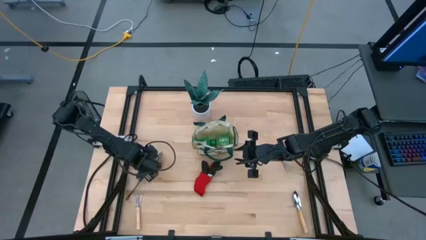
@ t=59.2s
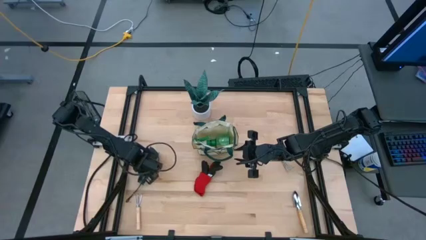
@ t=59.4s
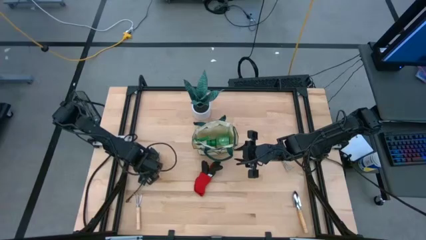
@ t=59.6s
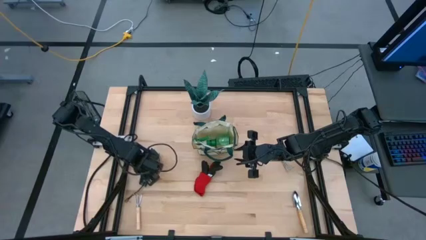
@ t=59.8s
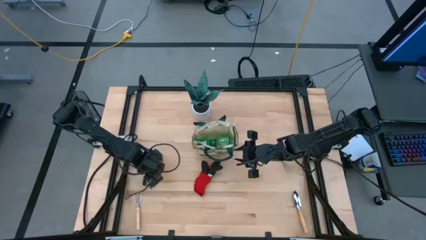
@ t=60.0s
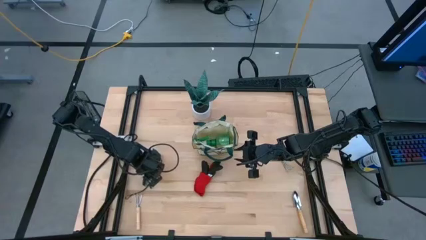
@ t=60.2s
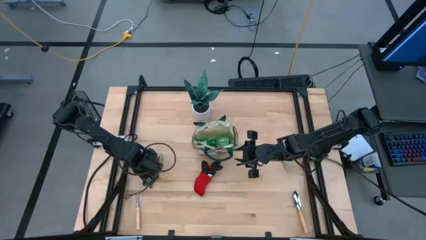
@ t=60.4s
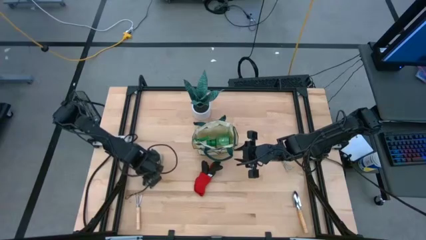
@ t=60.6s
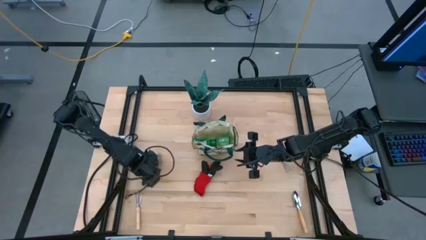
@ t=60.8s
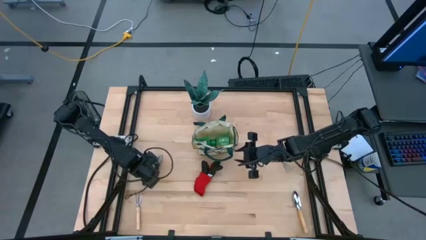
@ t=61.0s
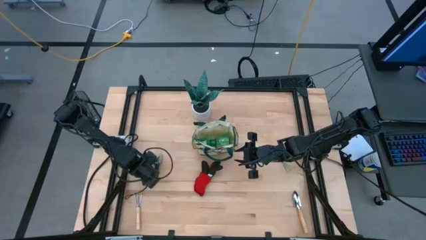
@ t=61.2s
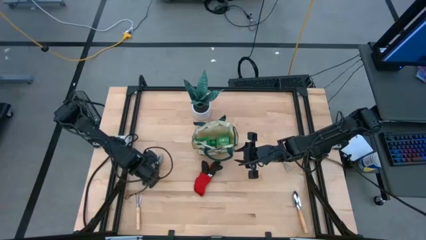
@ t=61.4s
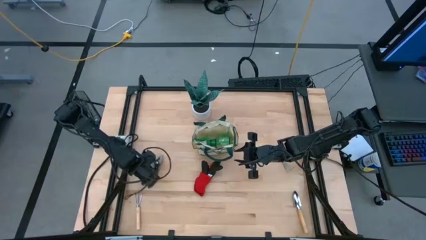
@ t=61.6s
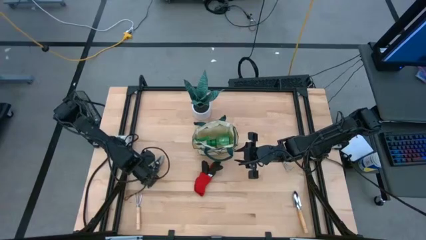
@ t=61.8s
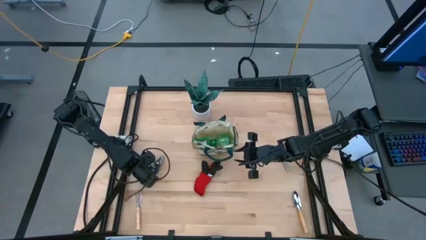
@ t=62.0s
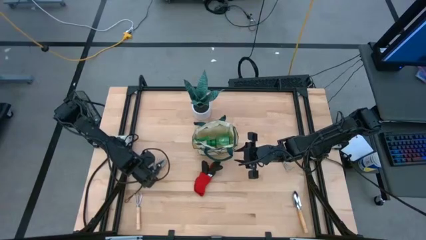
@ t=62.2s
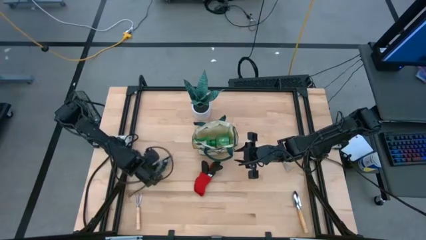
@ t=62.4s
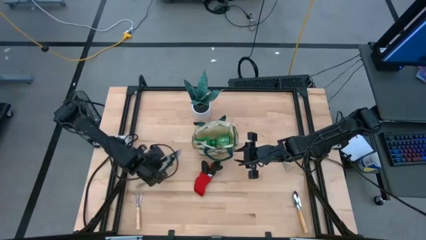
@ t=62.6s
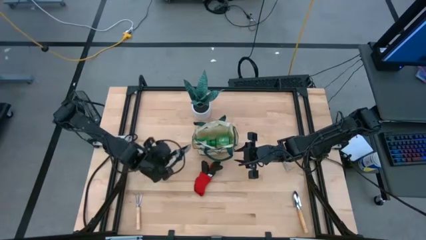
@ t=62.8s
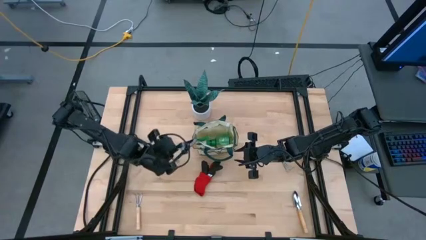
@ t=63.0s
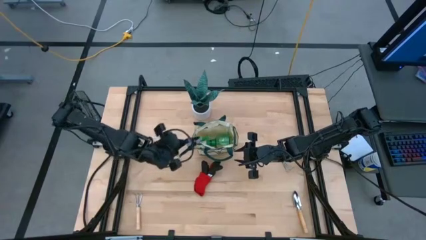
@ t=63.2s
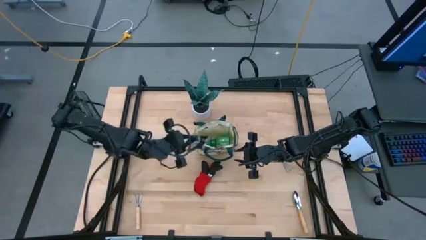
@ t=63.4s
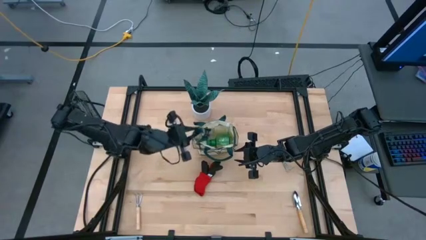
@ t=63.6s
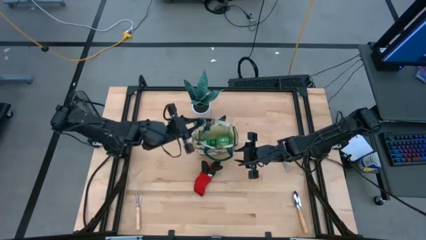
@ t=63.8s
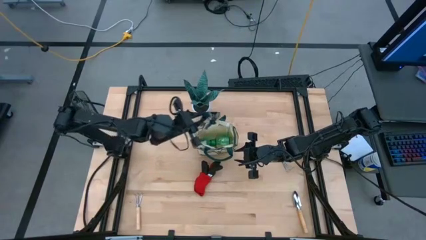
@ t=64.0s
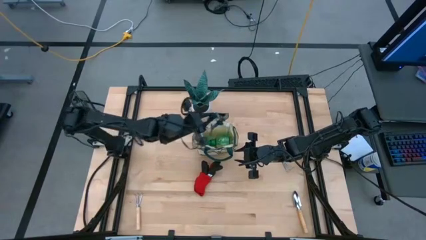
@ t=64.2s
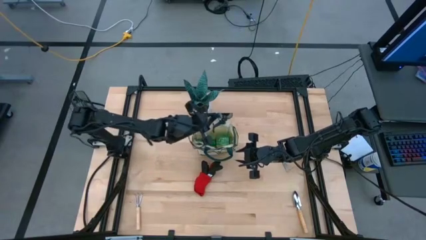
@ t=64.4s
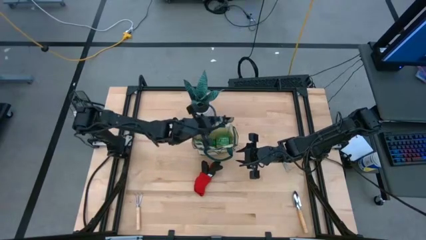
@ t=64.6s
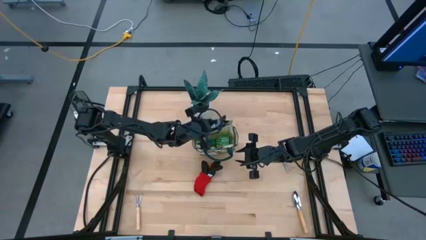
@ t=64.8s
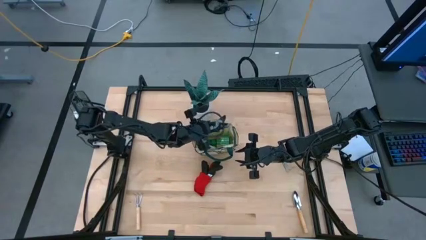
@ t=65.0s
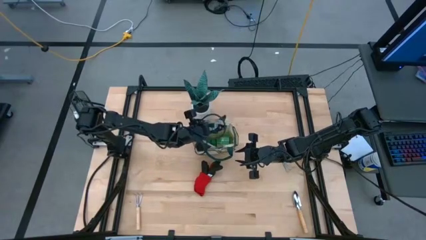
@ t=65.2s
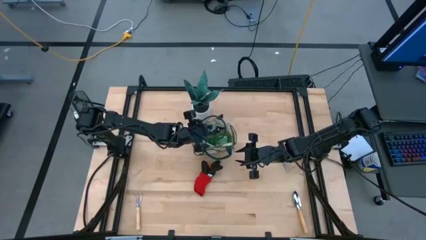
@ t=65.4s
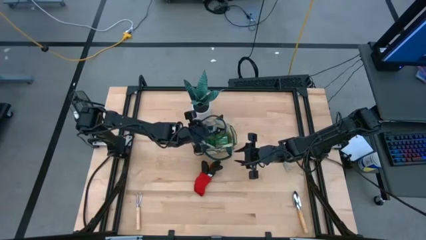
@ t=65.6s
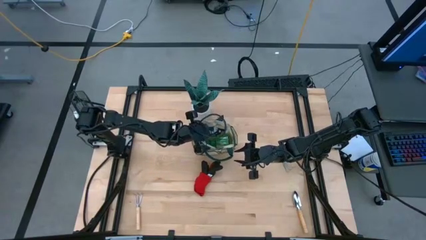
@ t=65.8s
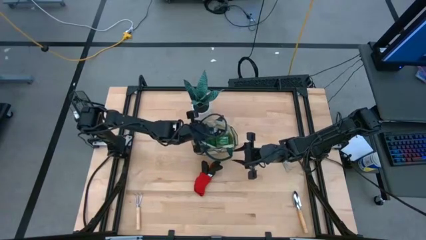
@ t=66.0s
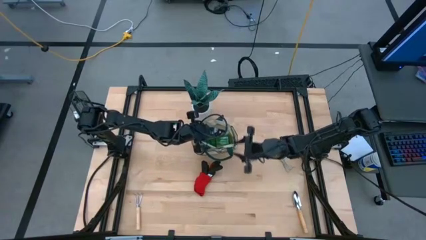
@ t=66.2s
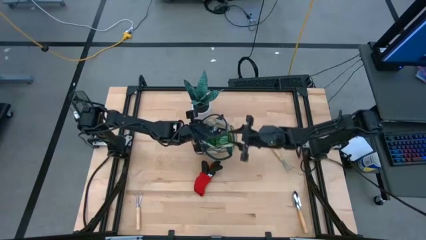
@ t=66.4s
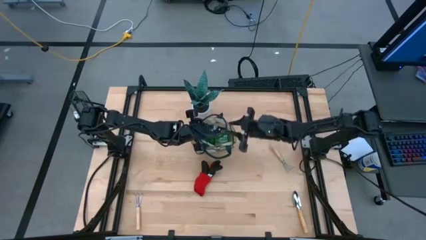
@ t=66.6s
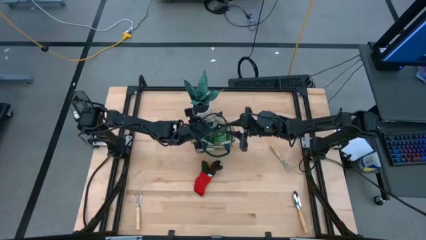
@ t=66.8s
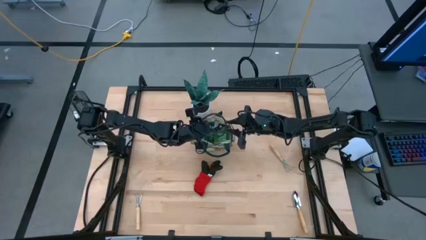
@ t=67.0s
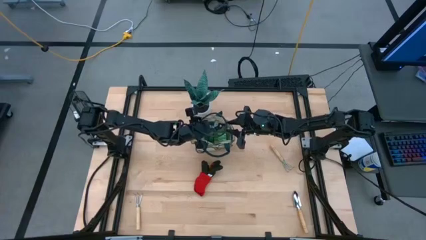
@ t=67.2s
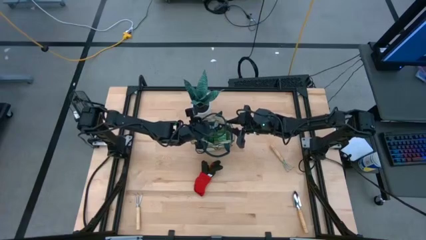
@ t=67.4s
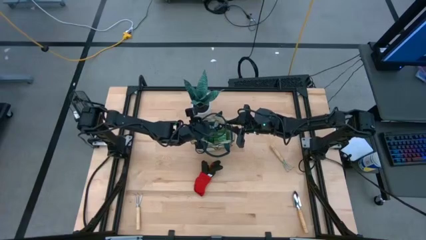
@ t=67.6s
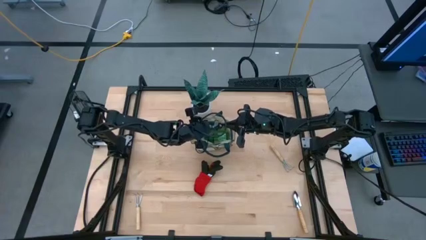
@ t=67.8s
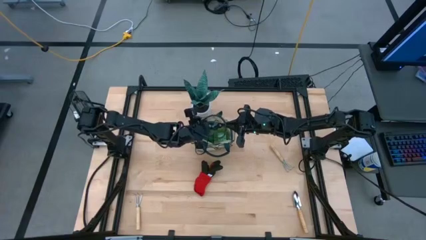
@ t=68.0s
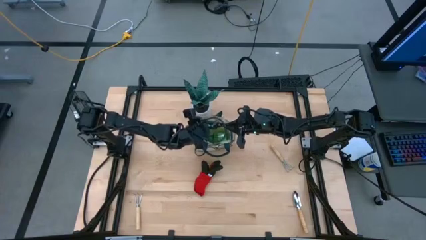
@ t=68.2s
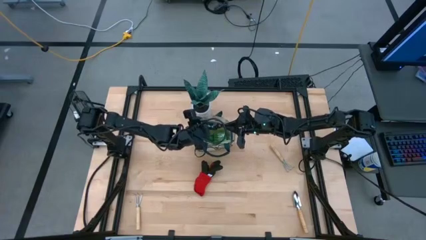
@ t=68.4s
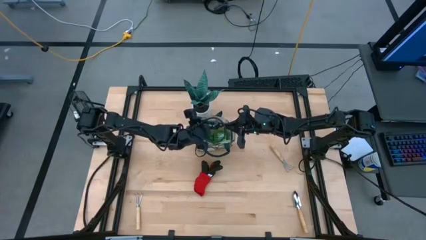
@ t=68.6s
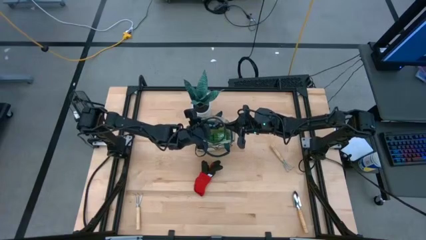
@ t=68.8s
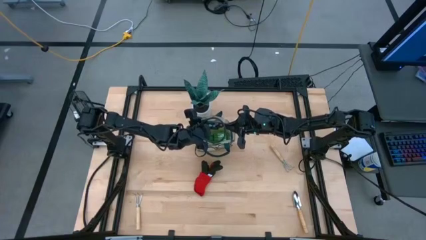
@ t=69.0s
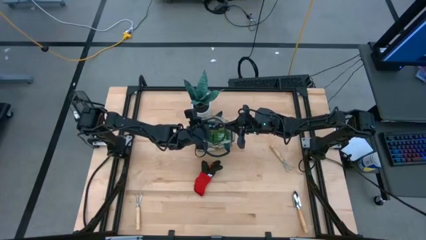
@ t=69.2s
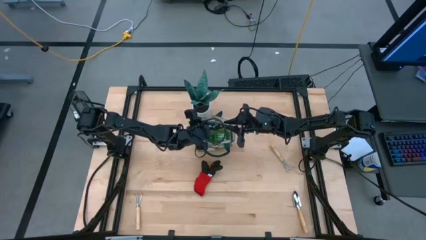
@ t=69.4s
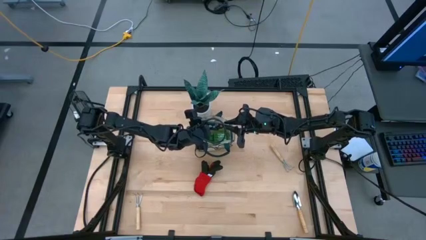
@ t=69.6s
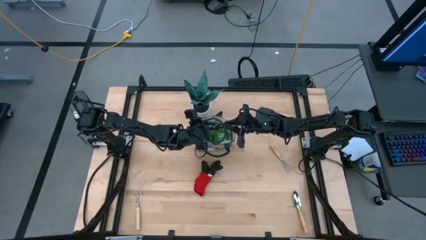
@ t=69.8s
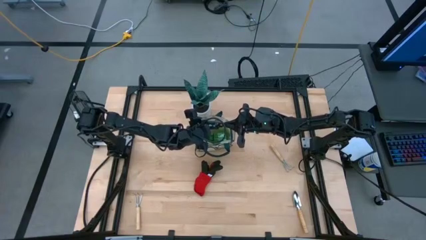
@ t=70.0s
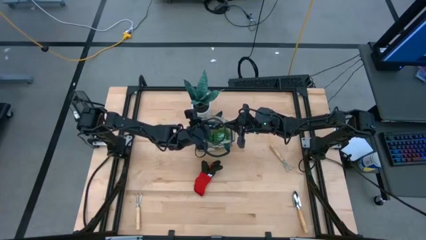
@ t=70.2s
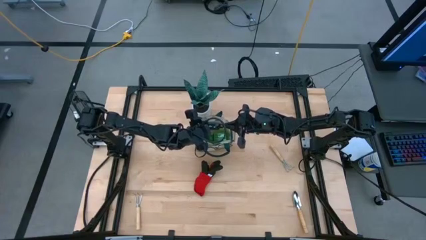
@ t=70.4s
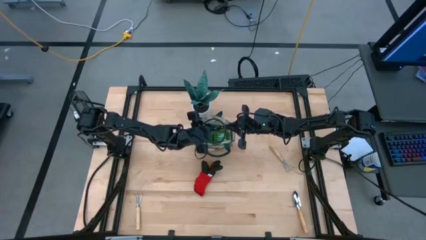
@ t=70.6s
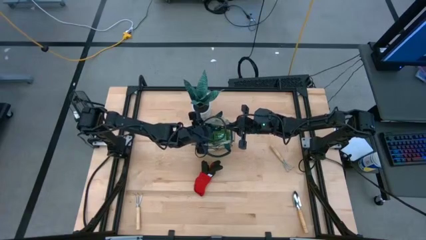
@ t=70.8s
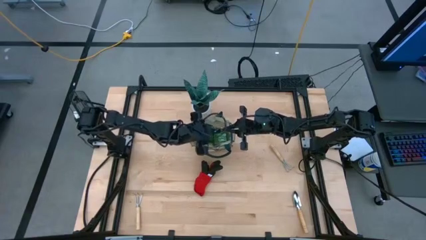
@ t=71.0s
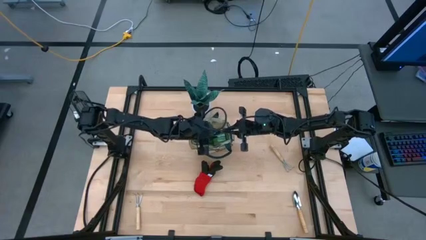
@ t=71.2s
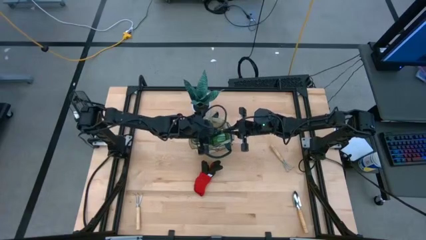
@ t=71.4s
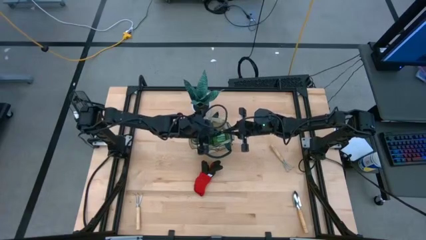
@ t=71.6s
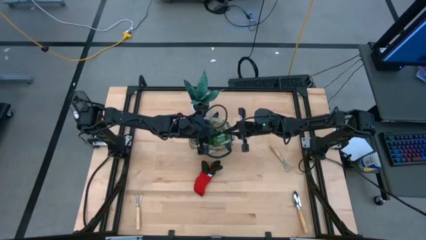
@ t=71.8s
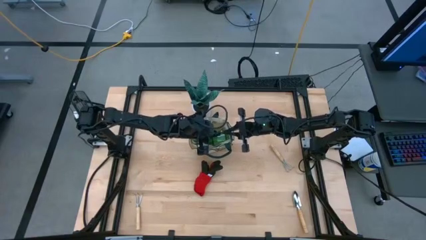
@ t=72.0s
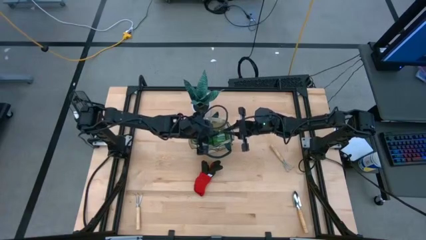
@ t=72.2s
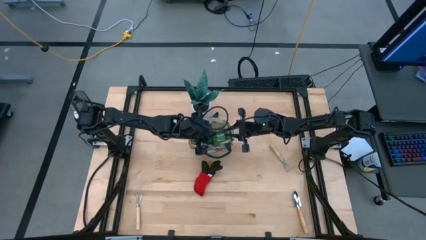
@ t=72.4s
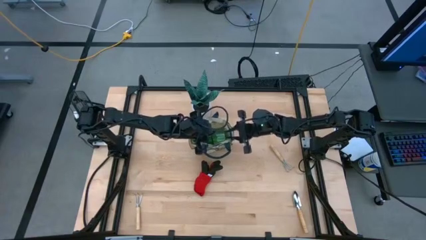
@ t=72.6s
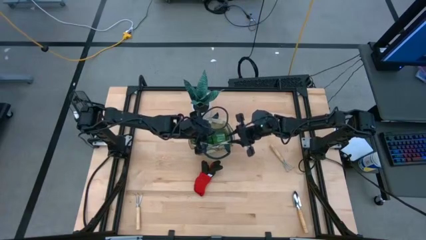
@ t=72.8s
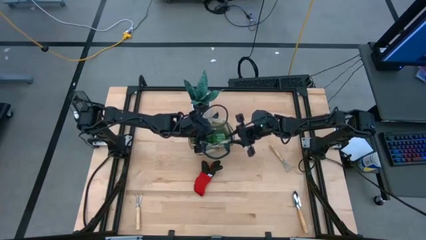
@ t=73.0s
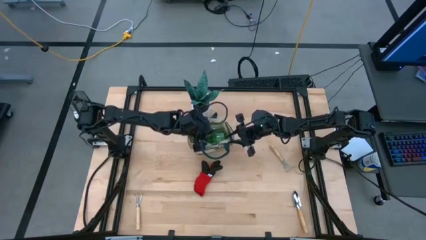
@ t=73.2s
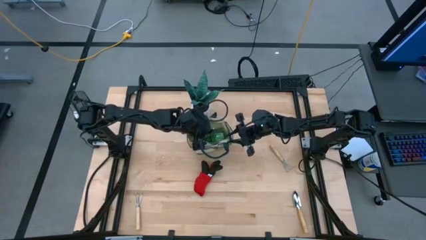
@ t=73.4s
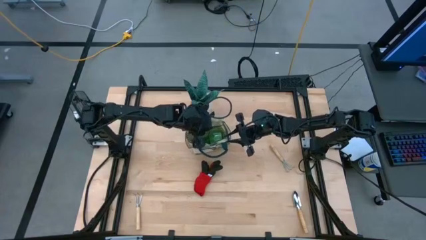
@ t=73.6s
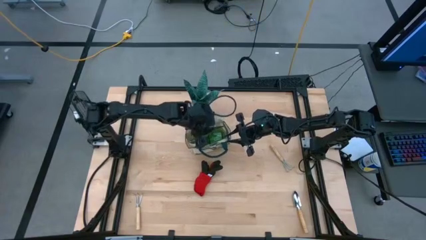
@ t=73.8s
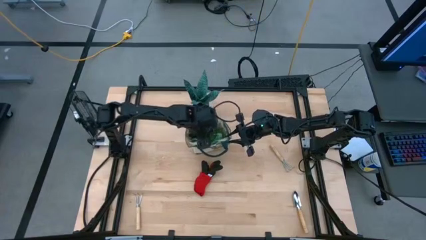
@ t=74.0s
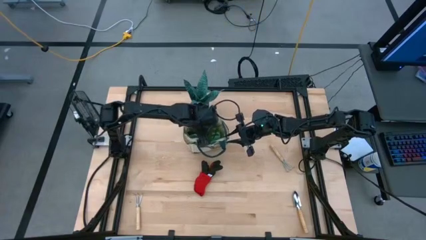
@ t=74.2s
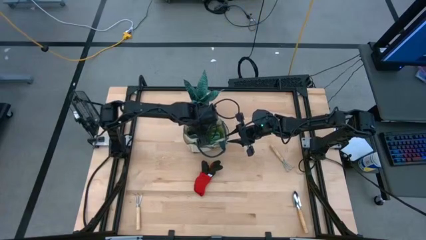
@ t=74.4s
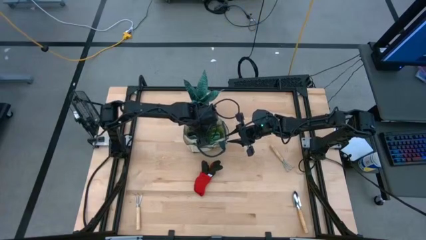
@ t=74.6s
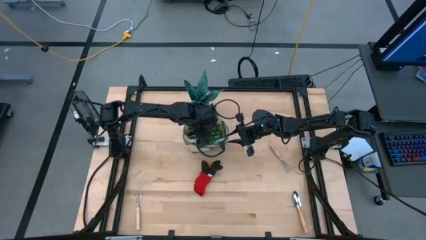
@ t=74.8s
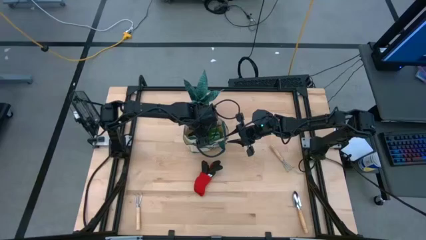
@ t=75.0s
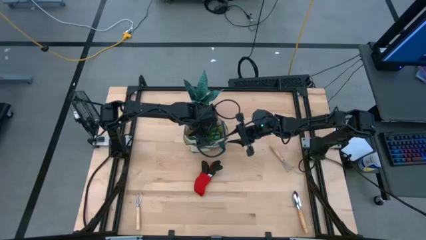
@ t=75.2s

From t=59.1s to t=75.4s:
Task: Pick & Place Garden tools in Gardening bag
Put the green shear scissors into the gardening bag
